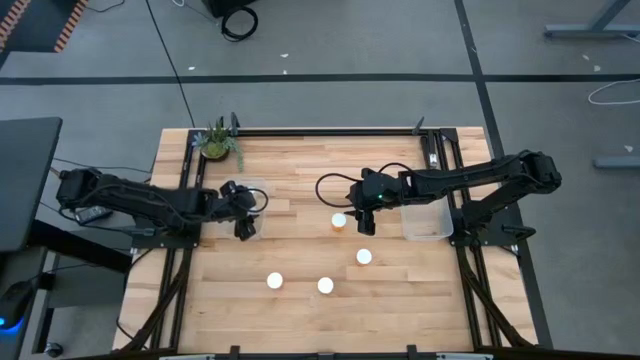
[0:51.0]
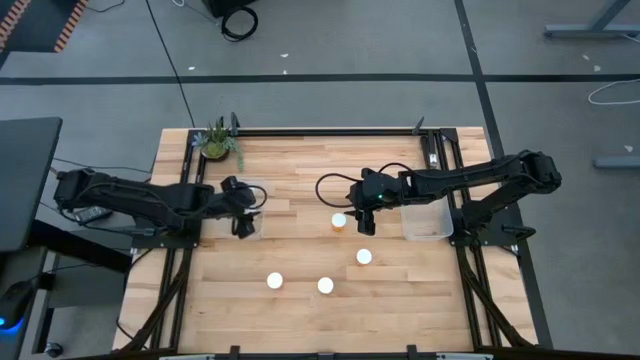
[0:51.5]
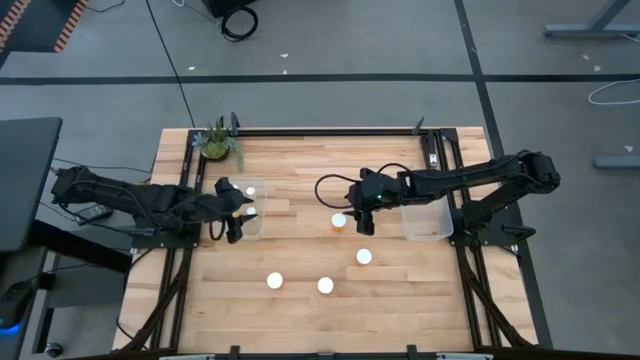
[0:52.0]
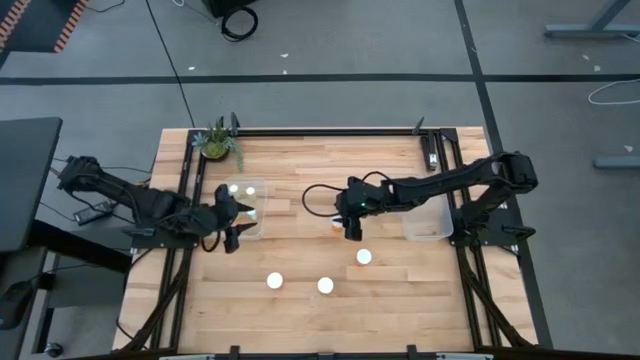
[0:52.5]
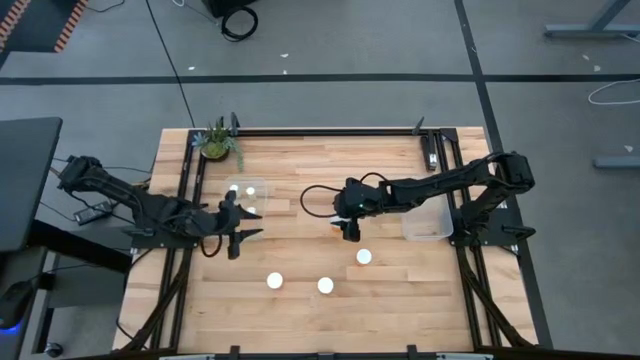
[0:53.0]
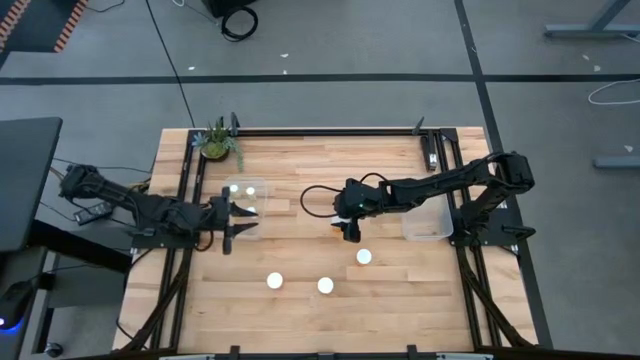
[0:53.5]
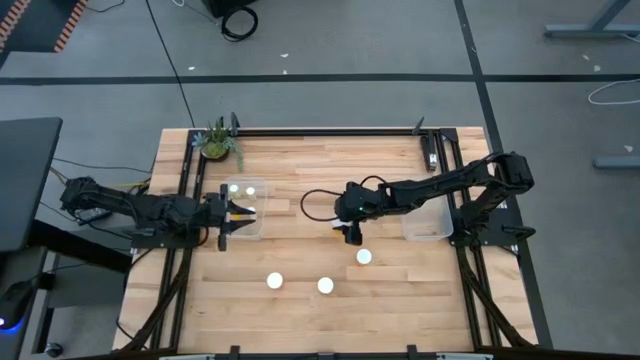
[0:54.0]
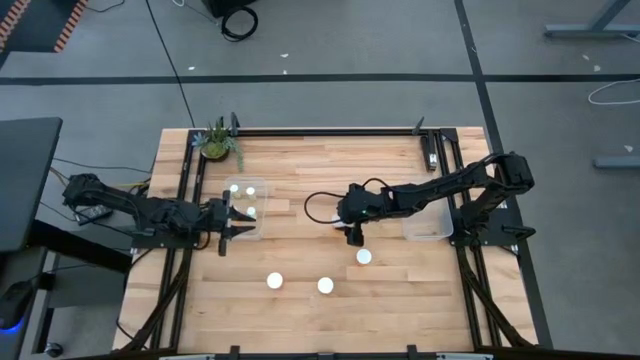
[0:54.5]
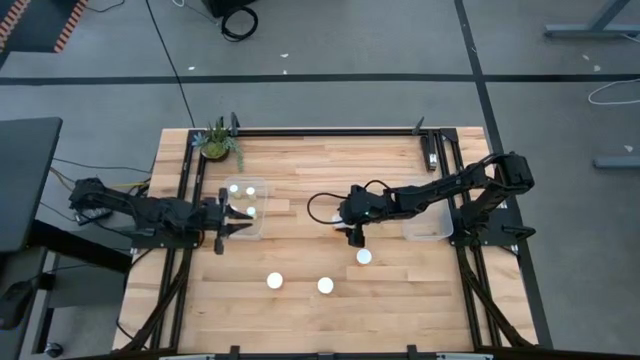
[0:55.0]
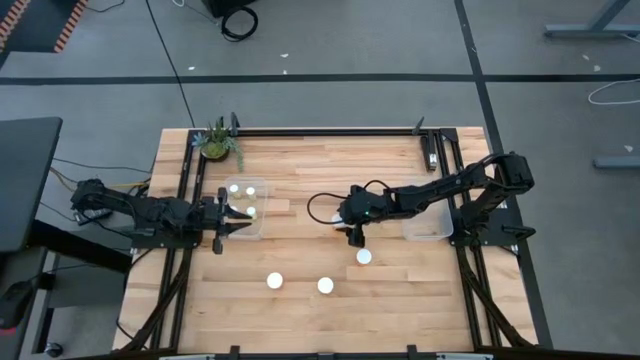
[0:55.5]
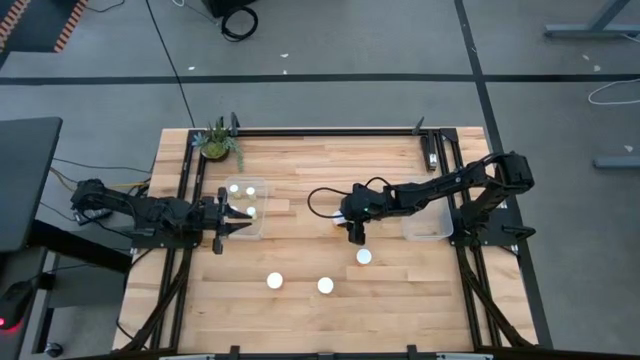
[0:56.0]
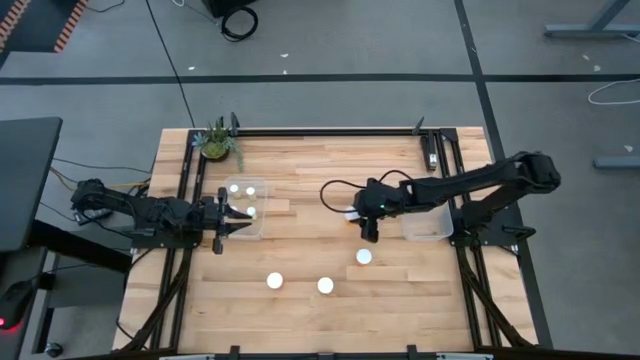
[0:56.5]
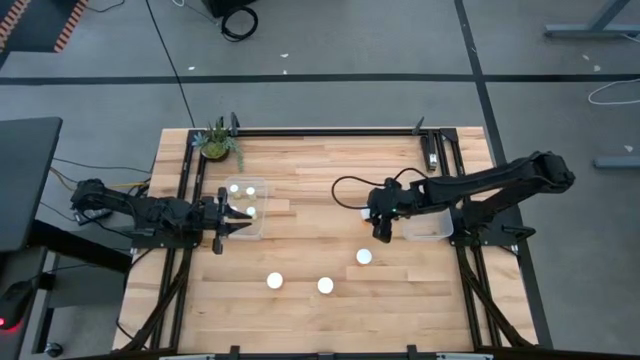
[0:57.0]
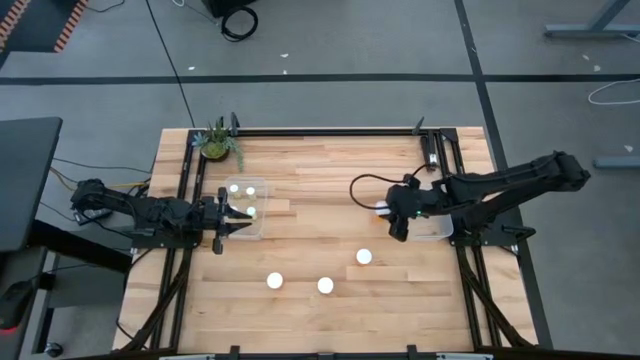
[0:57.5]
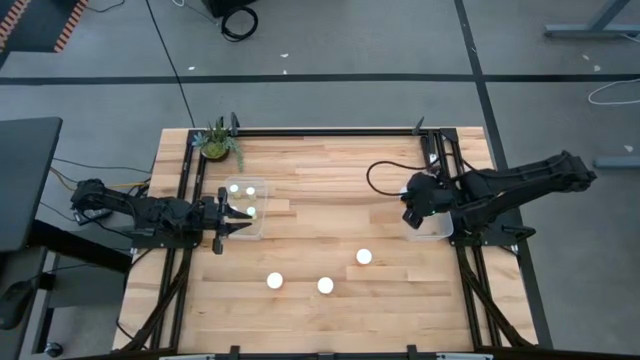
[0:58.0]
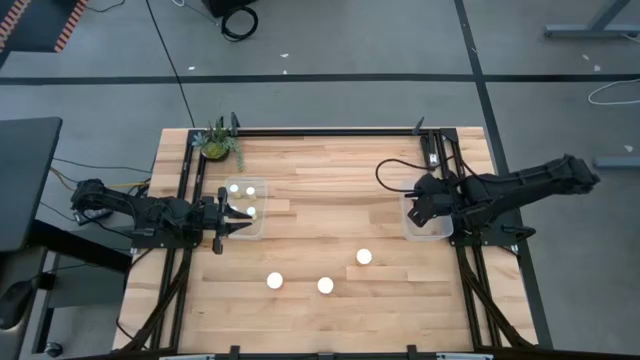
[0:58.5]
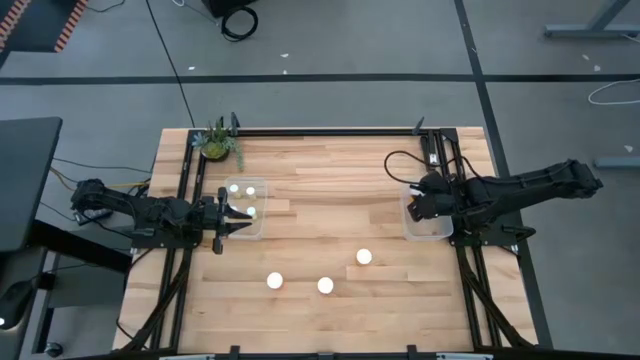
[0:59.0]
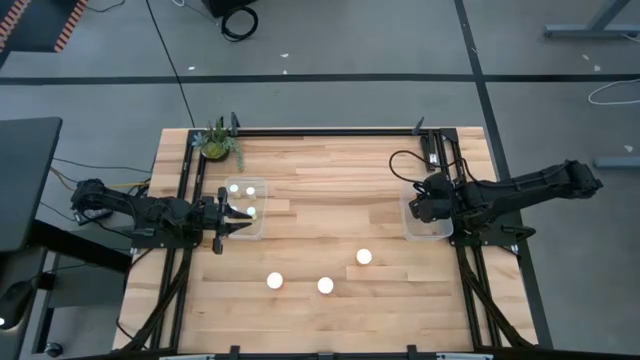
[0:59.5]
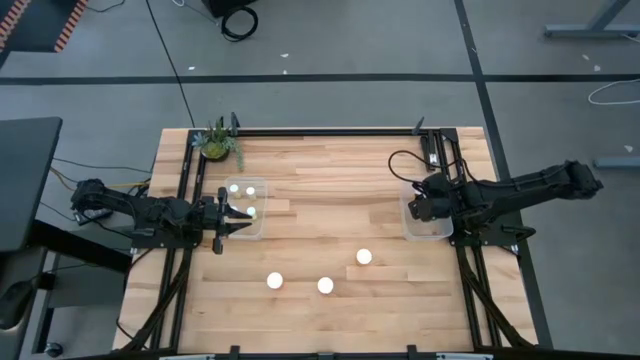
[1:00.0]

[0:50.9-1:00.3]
Task: Pick and place medicine bottles into bin by pill shape (circle, oval)
Put the big orange pill bottle into the right transparent bin

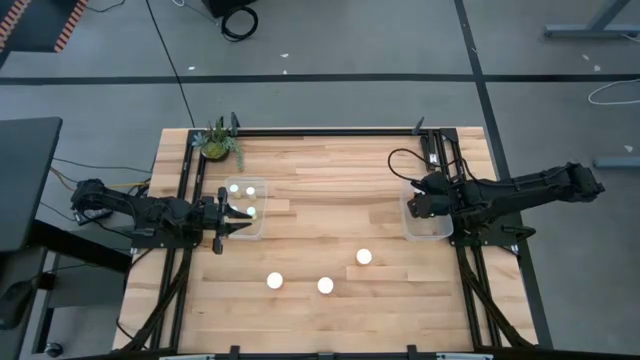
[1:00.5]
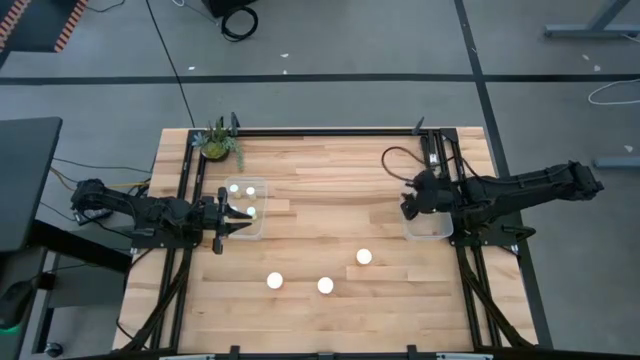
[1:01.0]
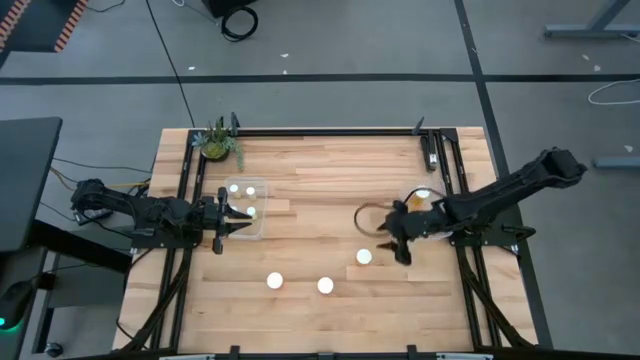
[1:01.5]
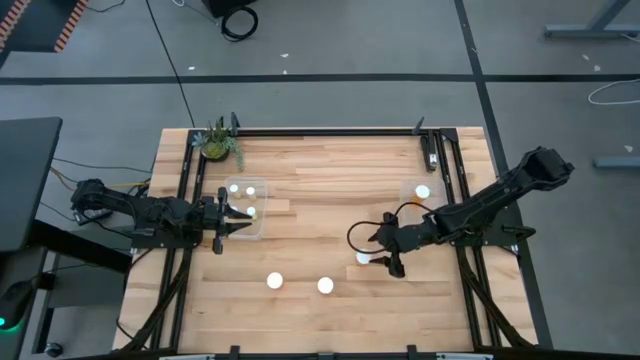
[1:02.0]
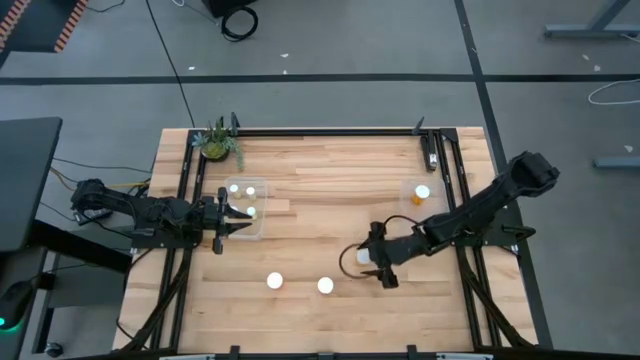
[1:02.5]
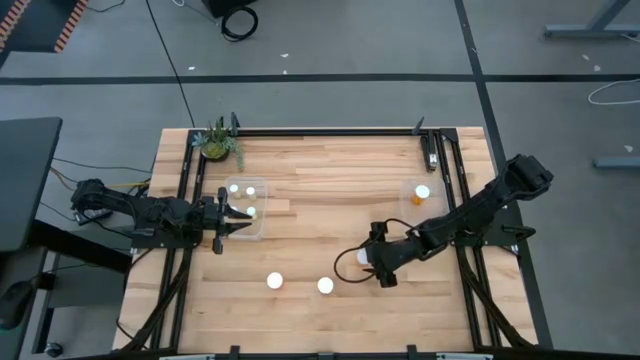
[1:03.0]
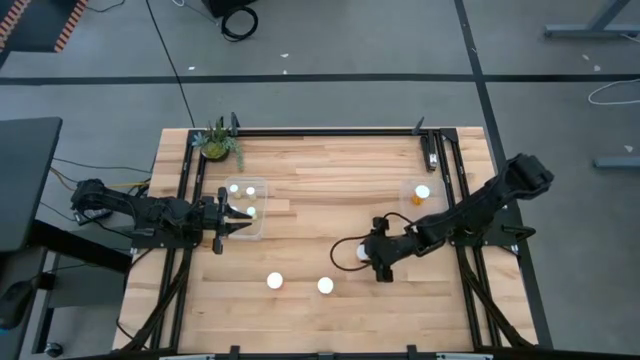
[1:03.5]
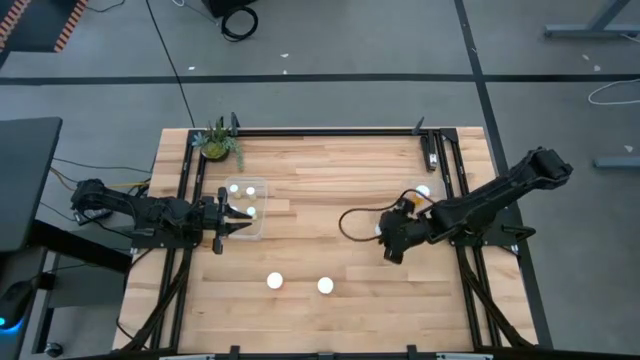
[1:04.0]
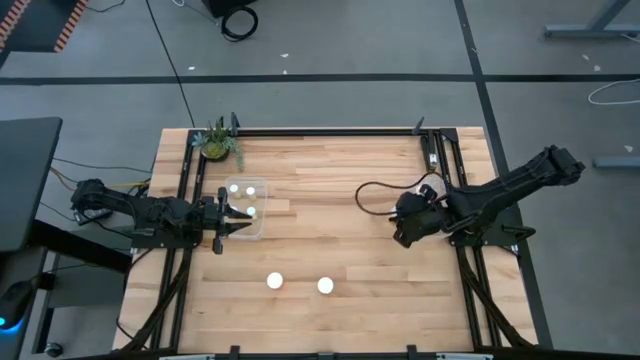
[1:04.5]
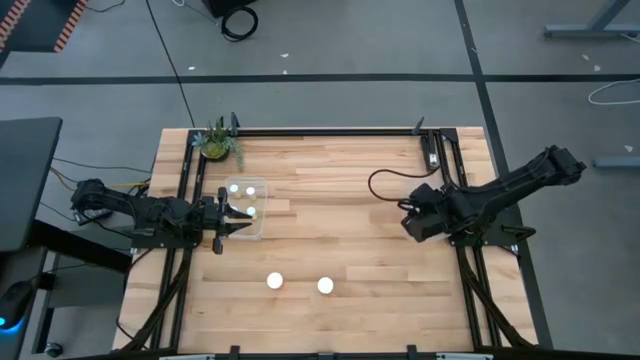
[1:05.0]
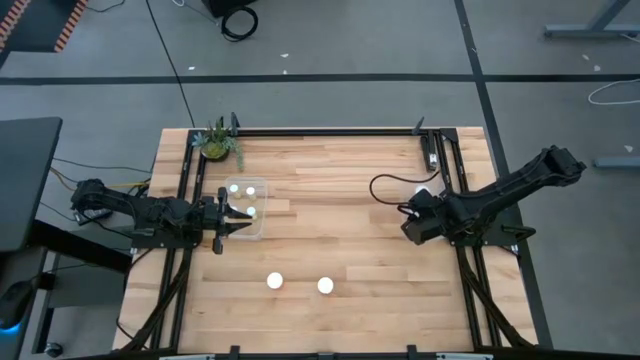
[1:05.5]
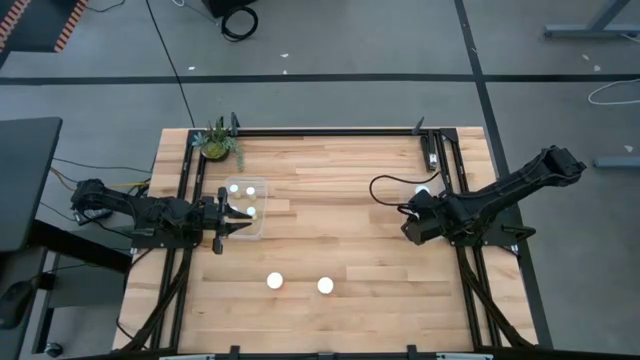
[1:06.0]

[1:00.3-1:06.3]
Put the big orange pill bottle into the right transparent bin

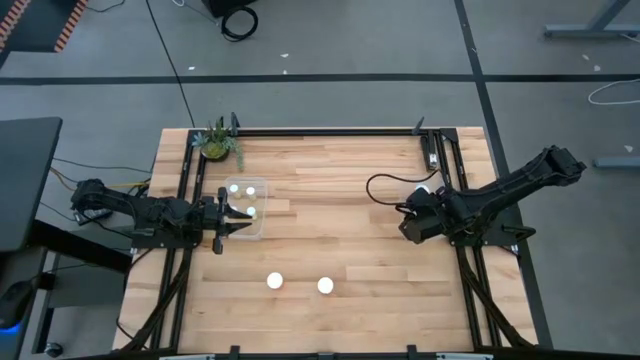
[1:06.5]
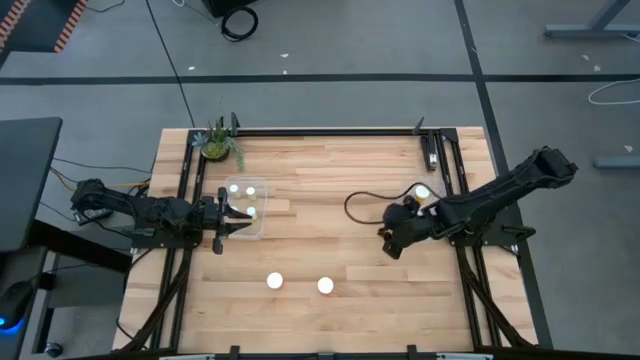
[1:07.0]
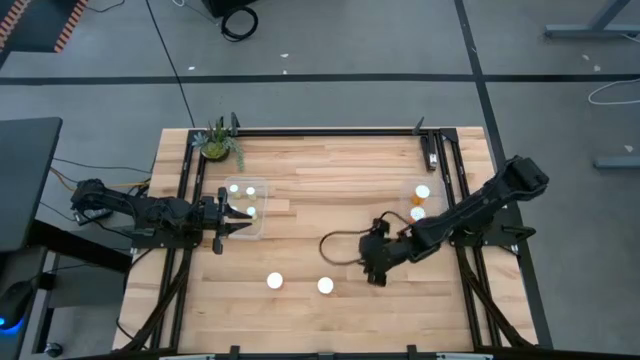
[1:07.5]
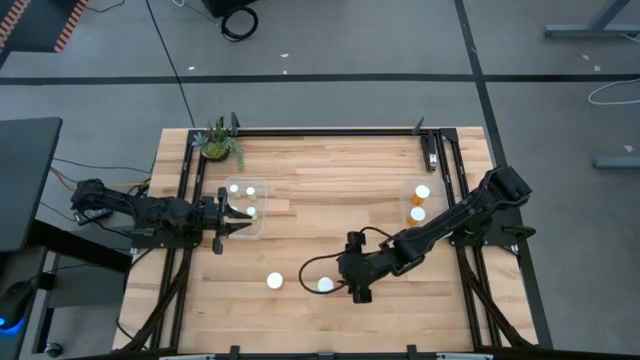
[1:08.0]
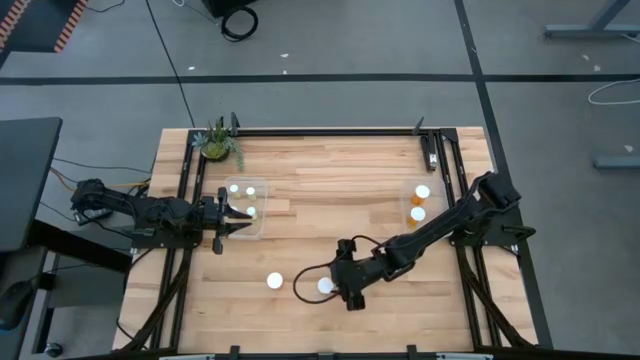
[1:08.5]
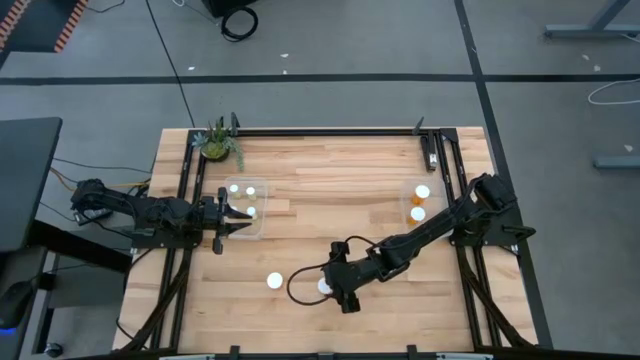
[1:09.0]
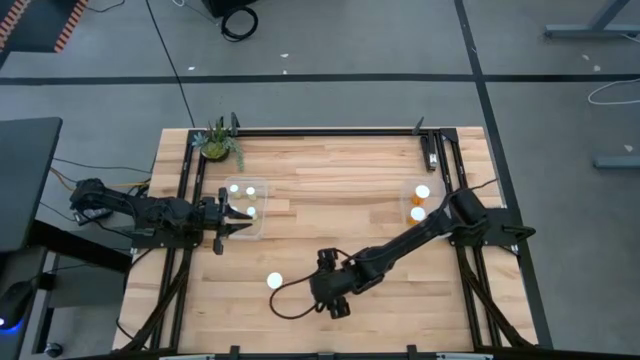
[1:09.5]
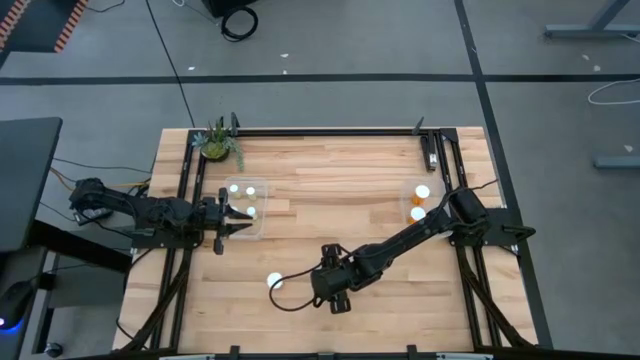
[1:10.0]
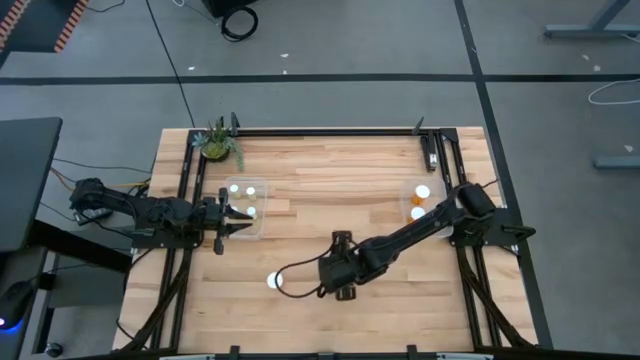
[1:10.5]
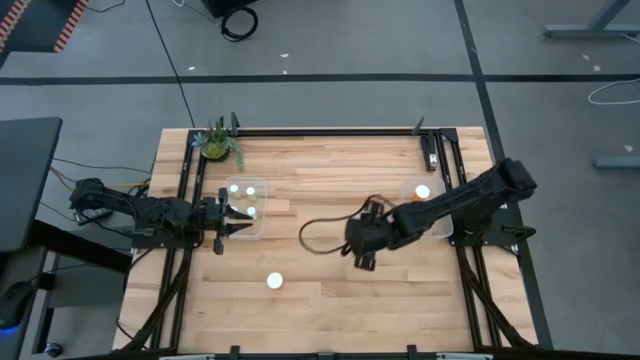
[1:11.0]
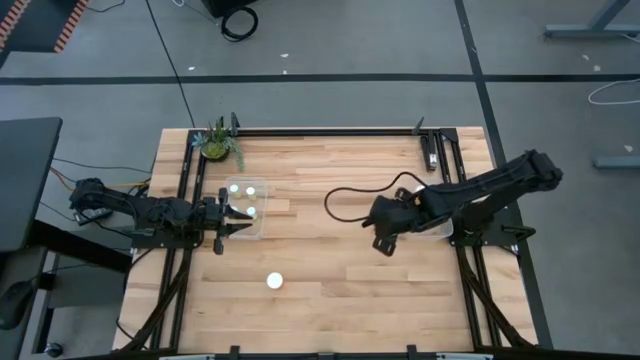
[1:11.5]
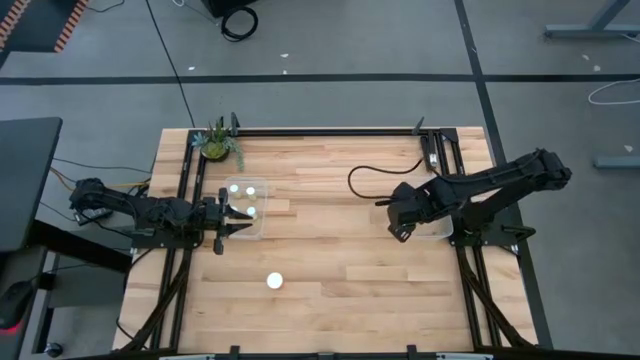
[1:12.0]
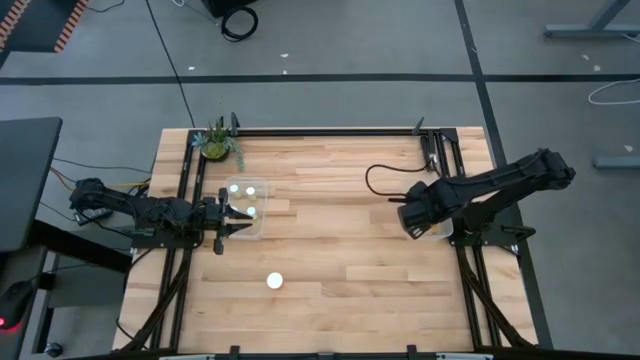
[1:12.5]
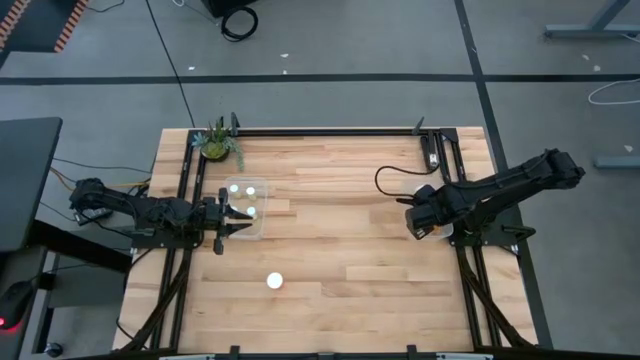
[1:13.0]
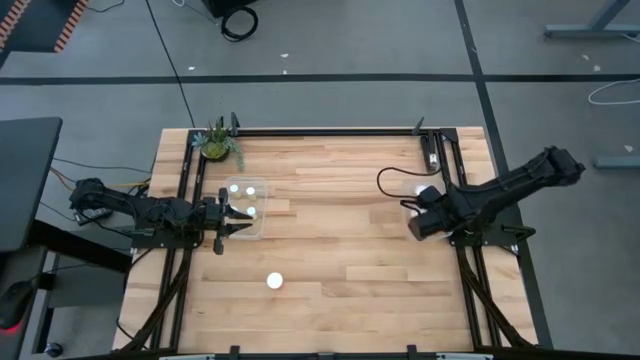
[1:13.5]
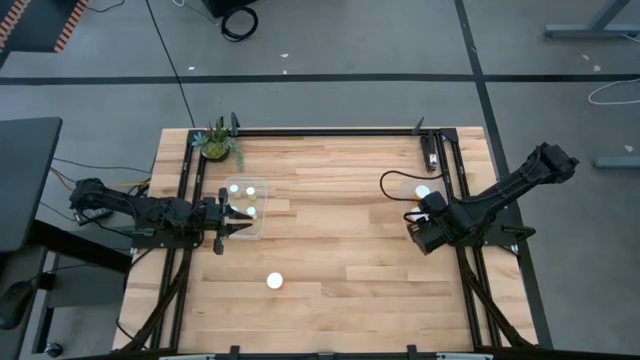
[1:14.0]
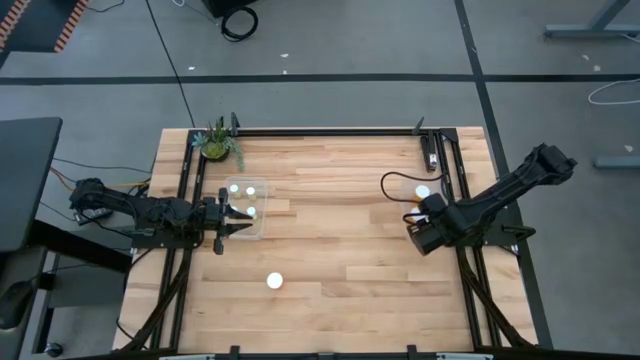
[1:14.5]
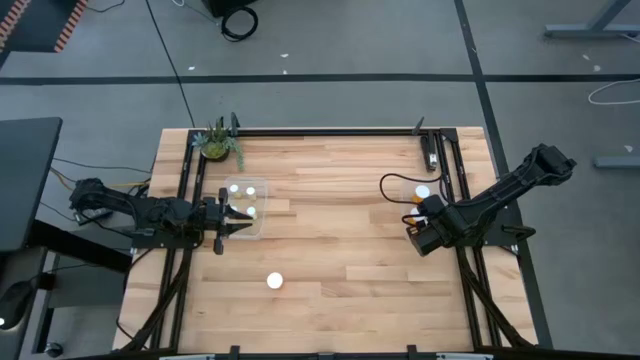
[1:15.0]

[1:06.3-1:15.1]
Put the big orange pill bottle into the right transparent bin
